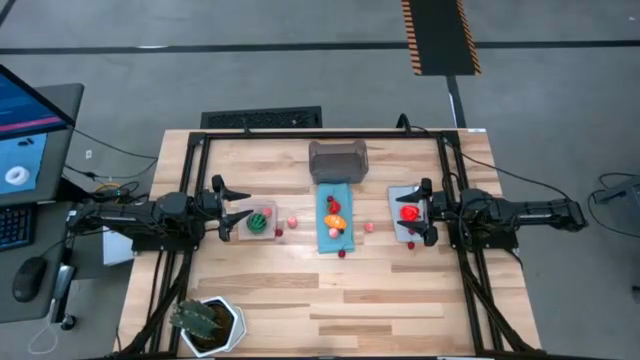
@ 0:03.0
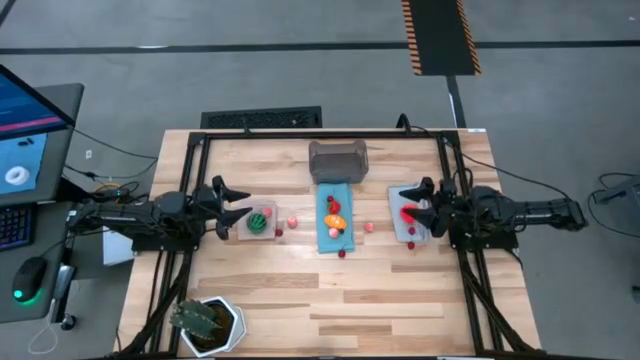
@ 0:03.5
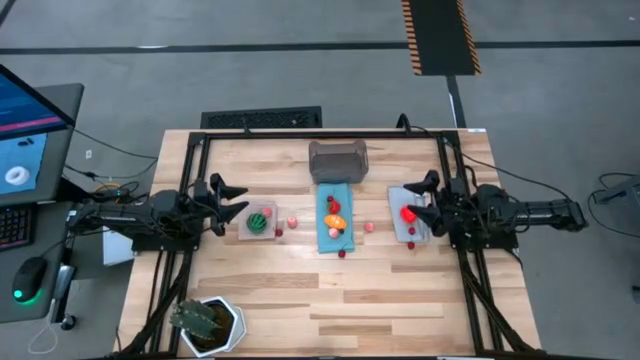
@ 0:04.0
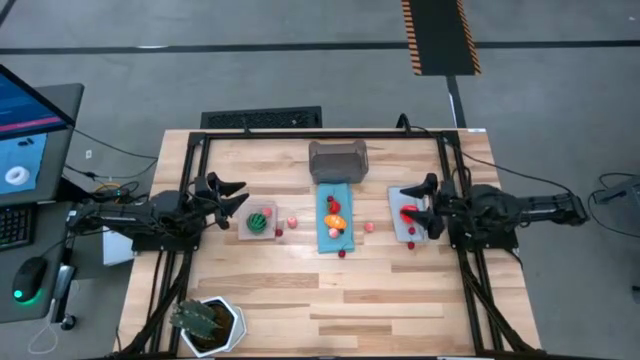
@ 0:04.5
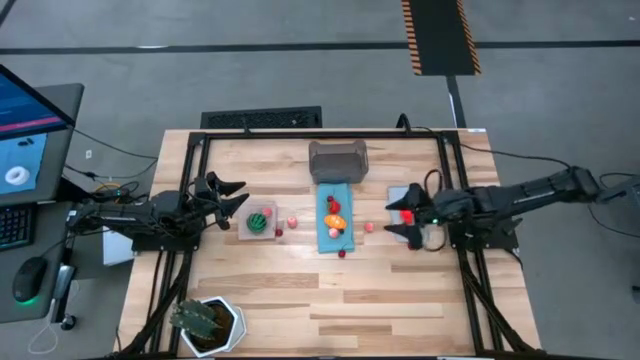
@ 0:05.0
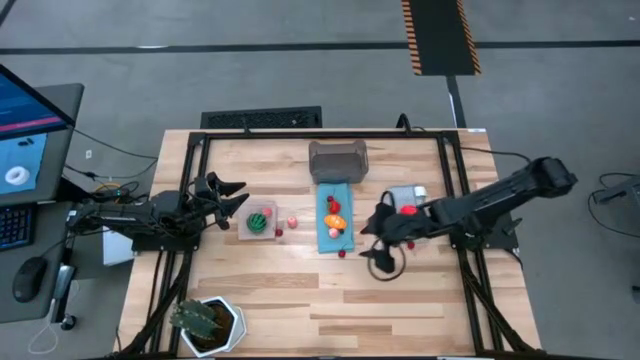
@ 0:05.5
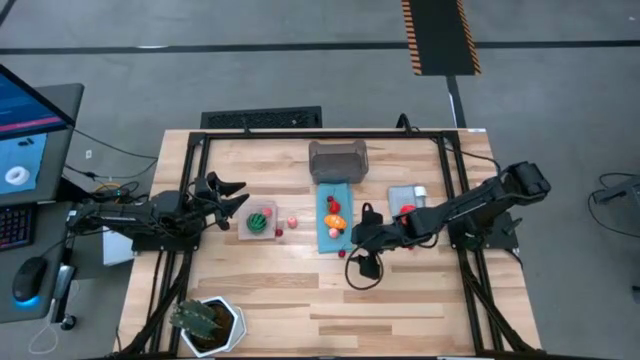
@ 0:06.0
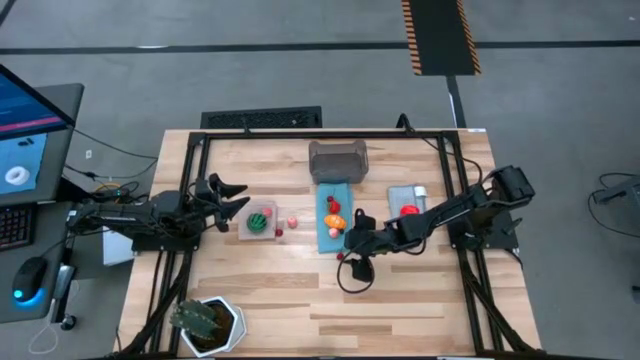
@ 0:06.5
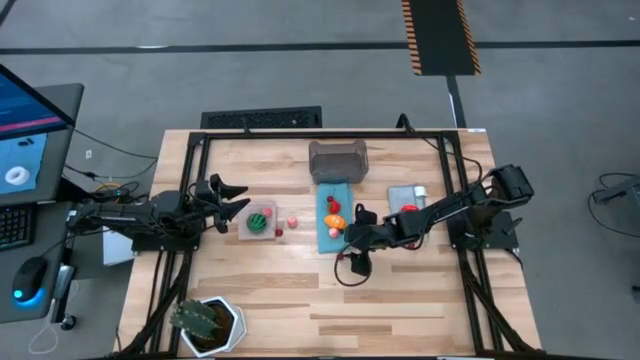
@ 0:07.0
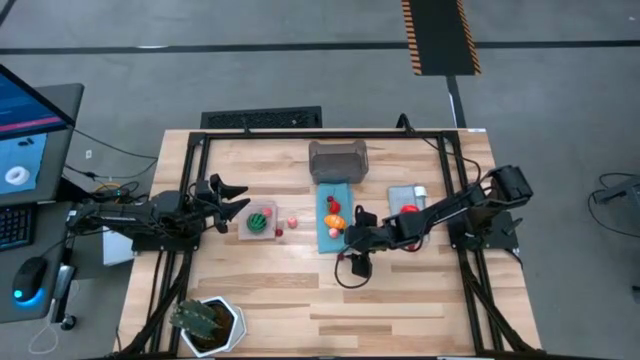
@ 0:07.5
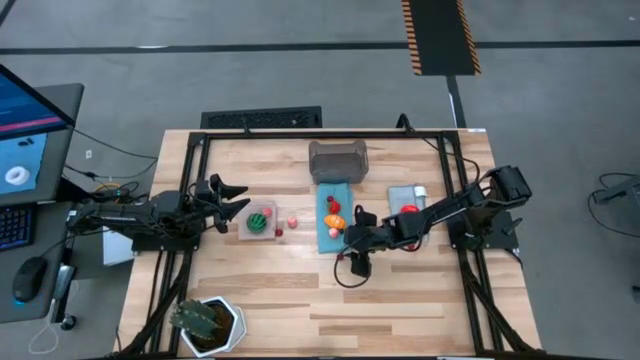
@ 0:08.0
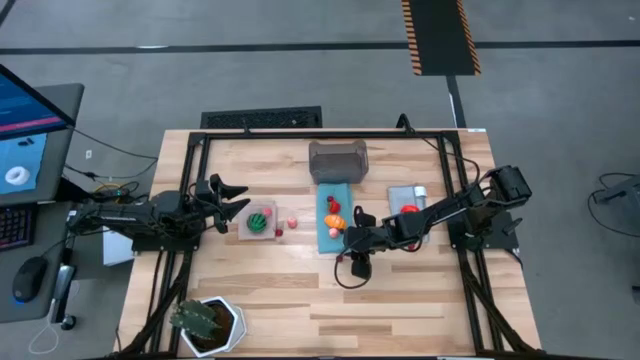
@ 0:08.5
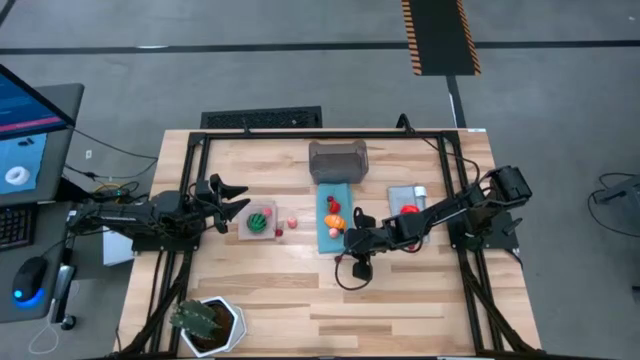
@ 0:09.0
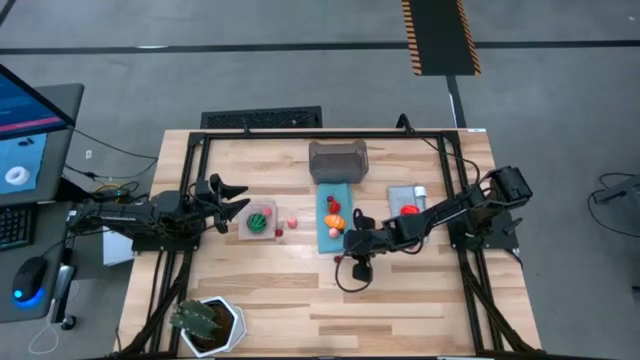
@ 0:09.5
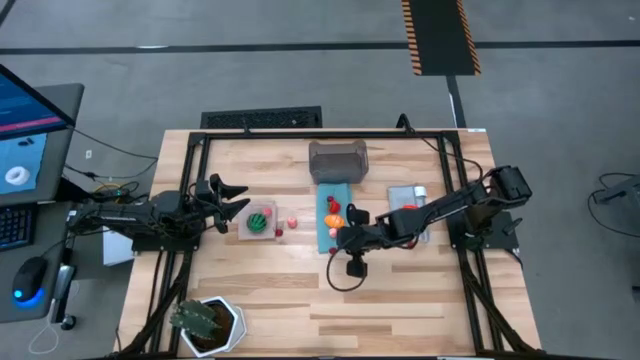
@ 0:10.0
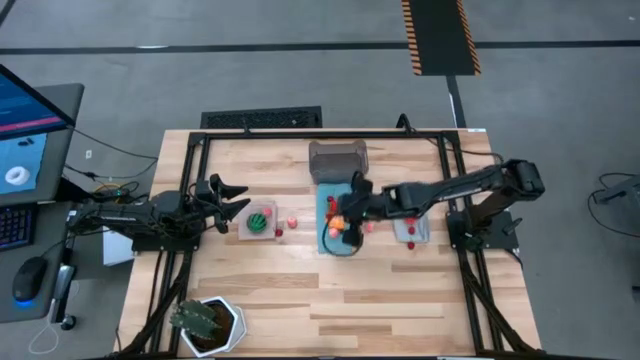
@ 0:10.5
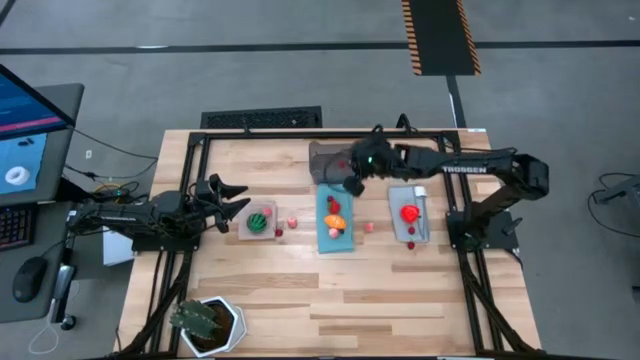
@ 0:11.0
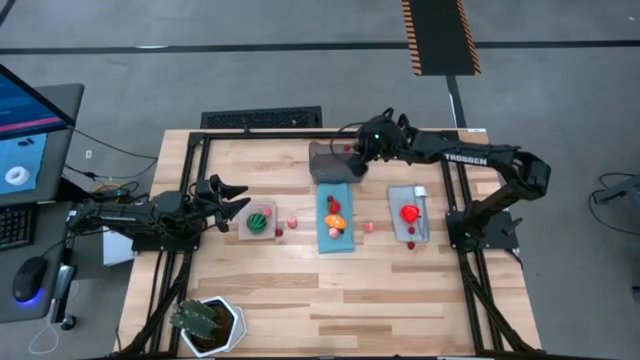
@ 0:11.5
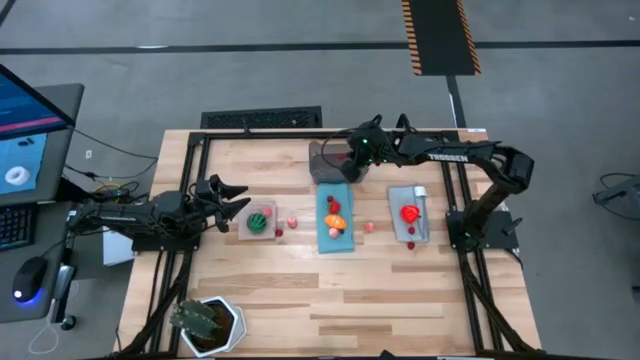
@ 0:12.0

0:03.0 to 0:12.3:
Task: Pick and placing Produce into tupperware
Put the red cherry into the gray bin

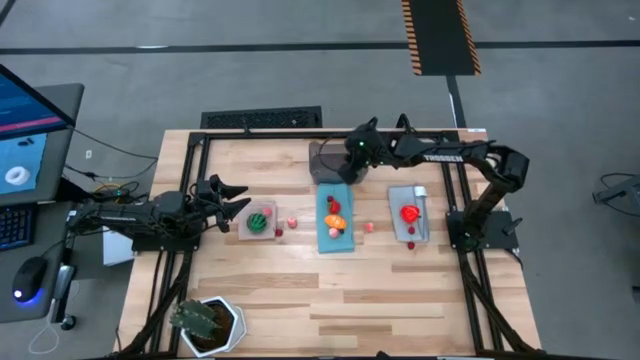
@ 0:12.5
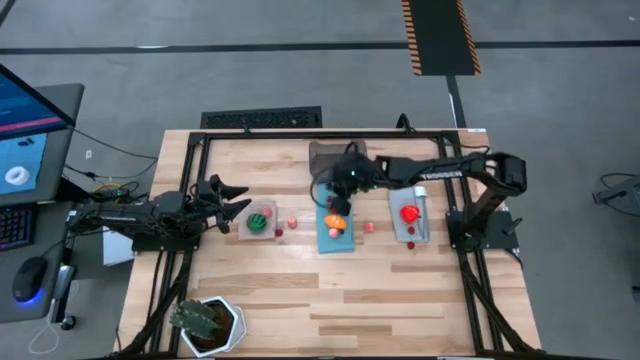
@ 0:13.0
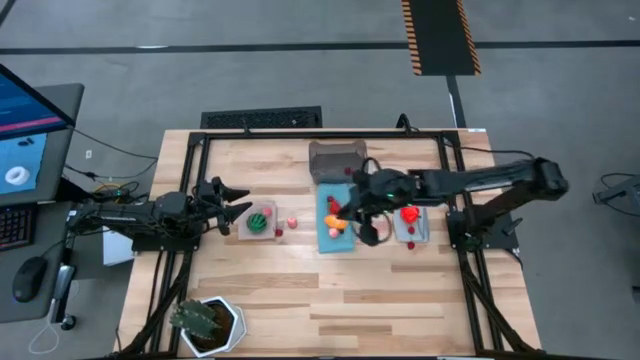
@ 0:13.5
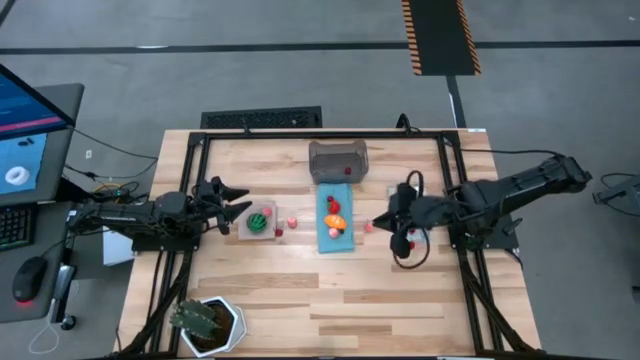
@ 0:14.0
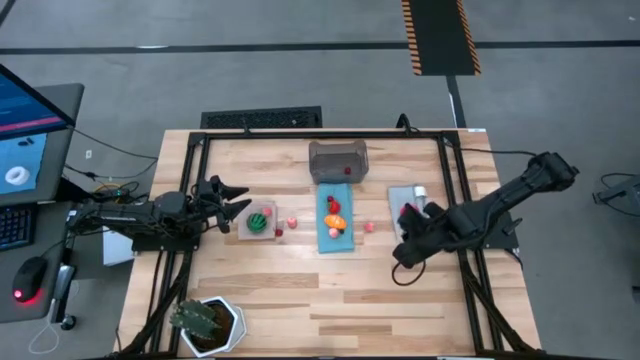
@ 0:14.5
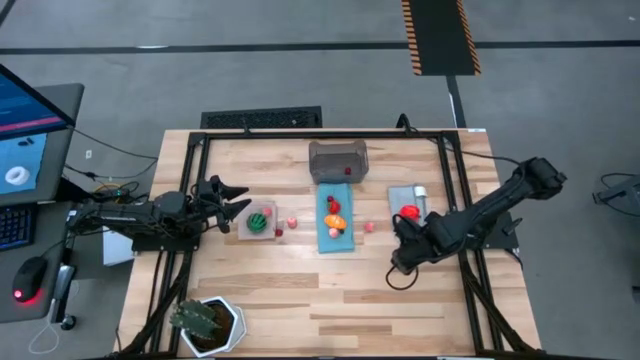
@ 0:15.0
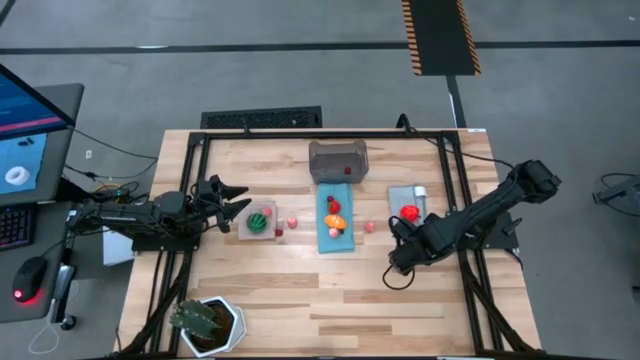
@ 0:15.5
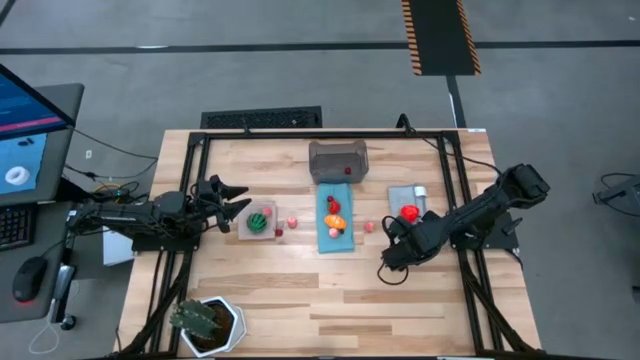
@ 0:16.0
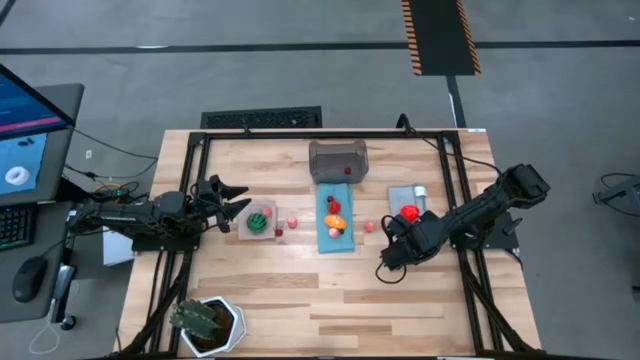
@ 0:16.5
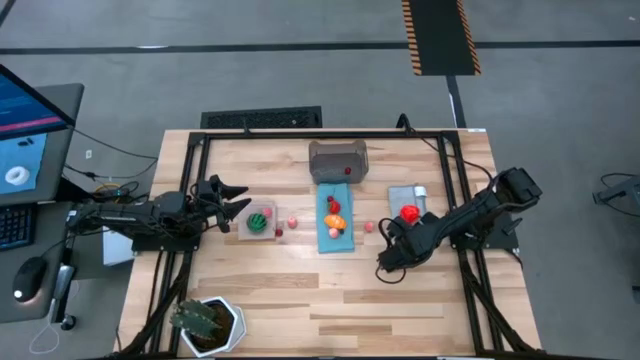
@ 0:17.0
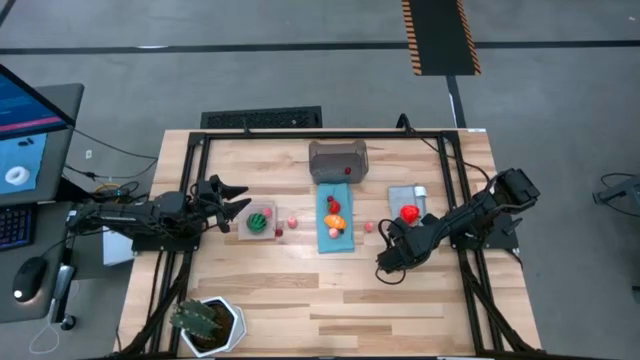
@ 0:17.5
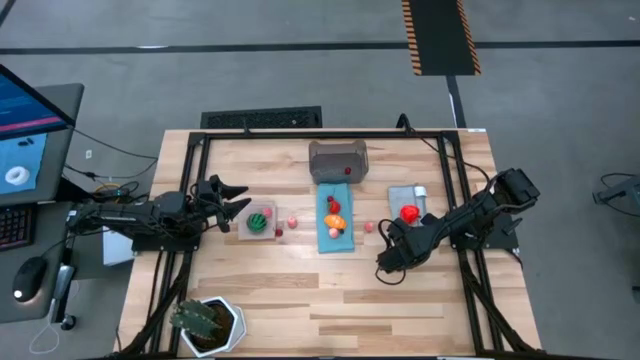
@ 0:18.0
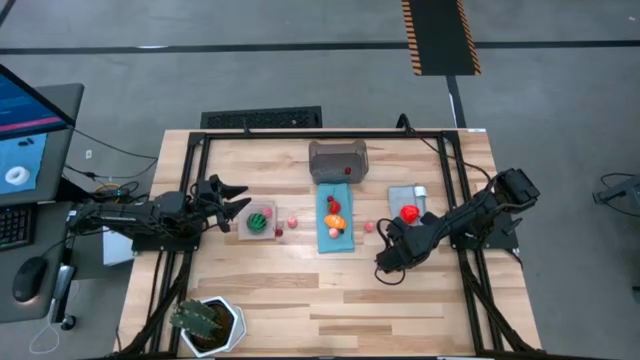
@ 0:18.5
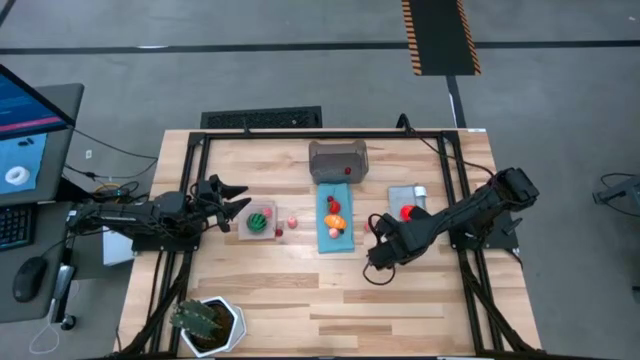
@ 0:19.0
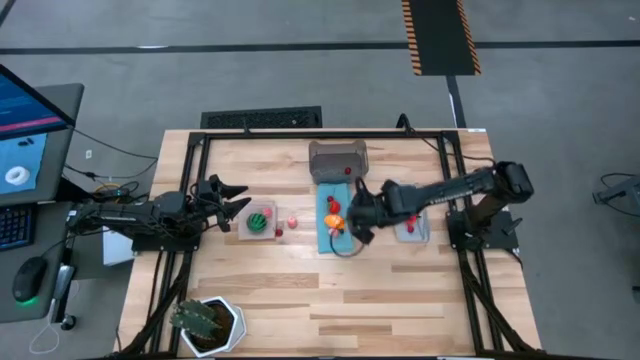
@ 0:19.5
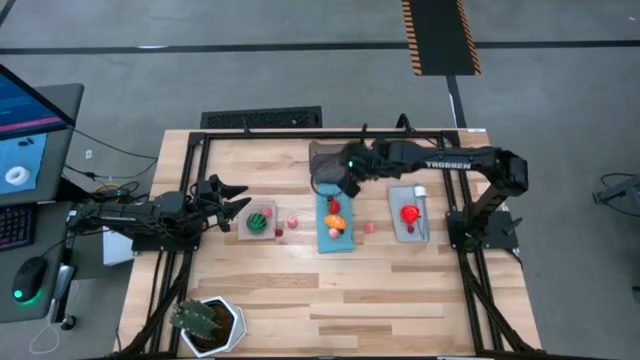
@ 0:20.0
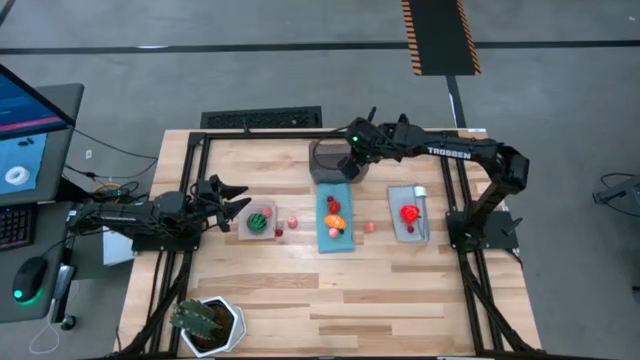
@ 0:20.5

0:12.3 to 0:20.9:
Put the red cherry into the gray bin

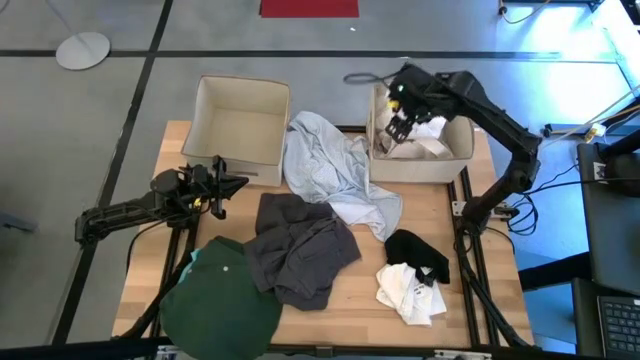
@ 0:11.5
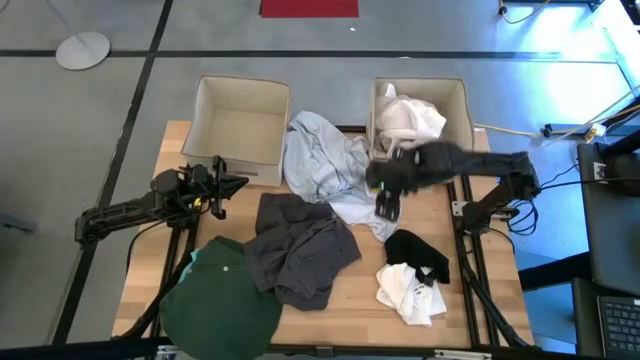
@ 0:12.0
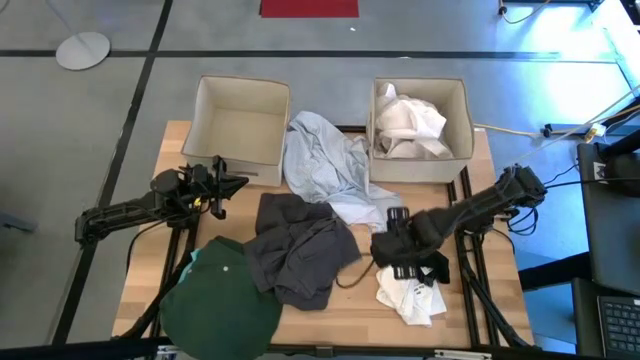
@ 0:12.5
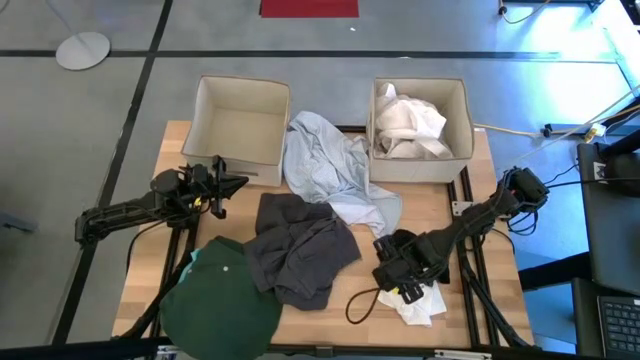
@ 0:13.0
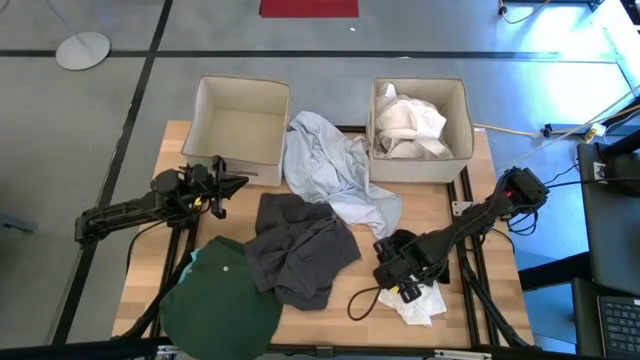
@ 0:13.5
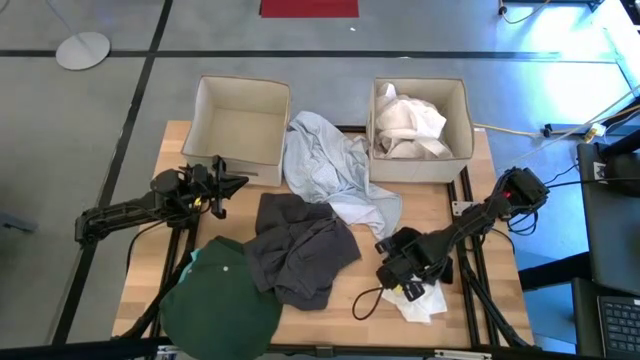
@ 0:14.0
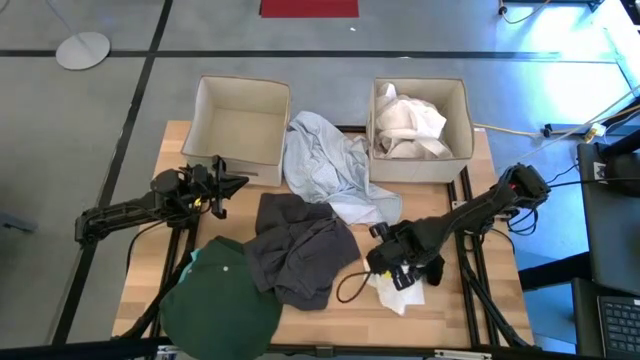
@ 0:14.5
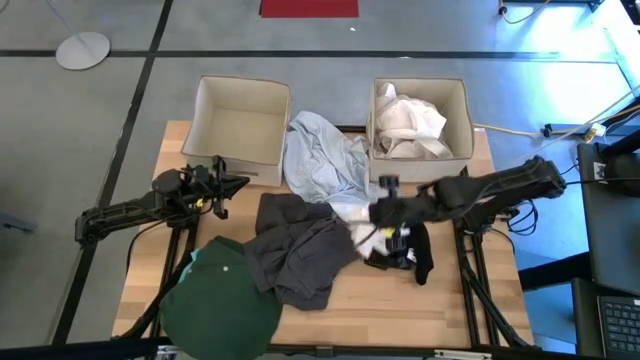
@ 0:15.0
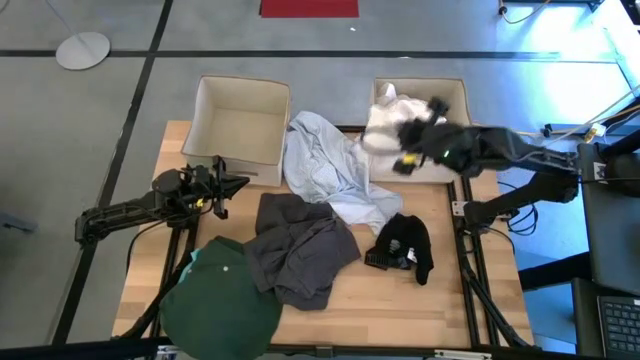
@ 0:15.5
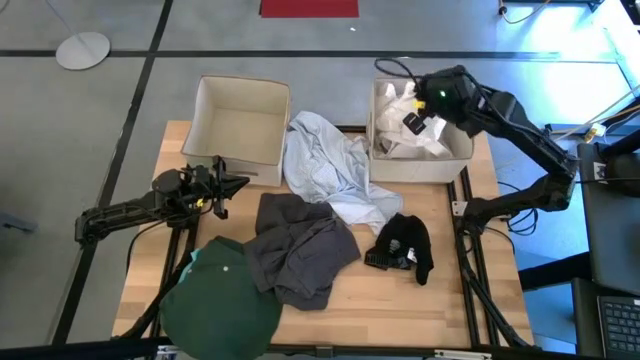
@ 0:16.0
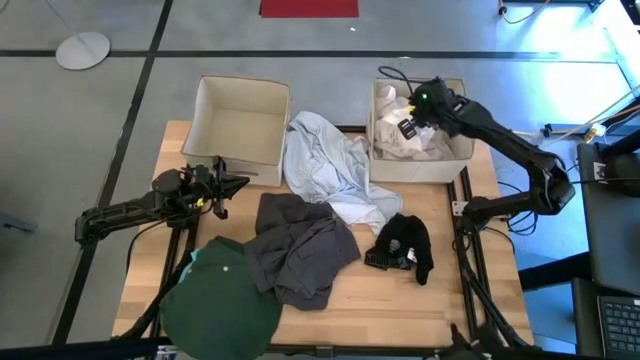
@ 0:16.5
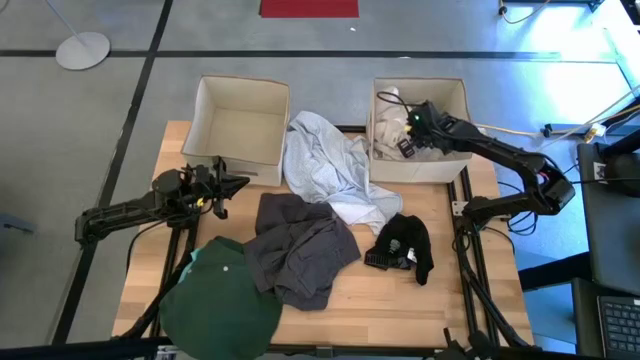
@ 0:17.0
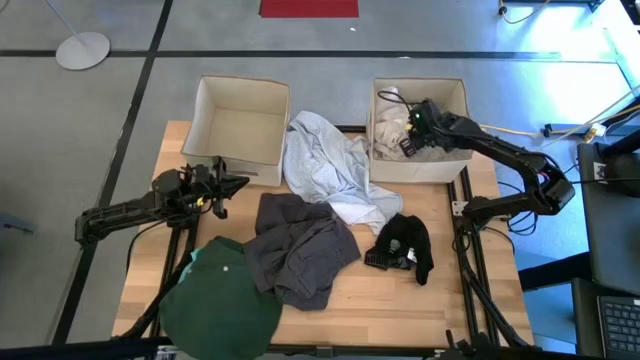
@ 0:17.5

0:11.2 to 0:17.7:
Task: Sort clothes
Put the white underwear into the right laundry bin
